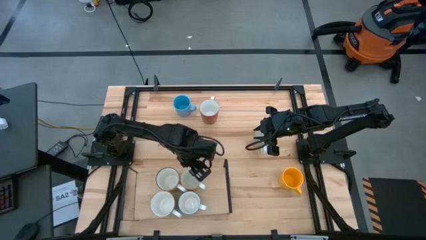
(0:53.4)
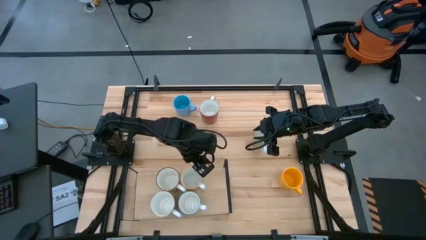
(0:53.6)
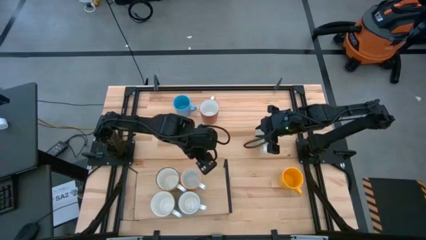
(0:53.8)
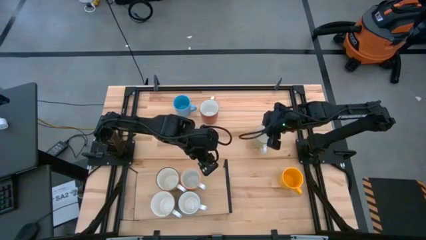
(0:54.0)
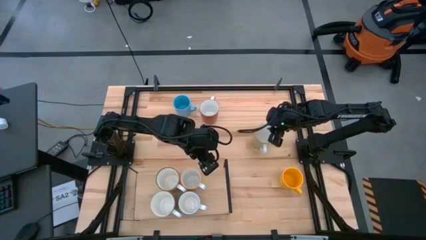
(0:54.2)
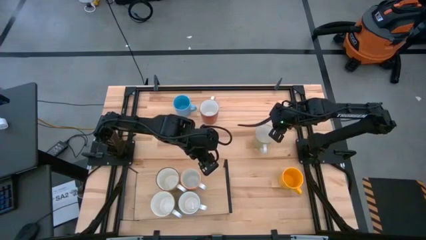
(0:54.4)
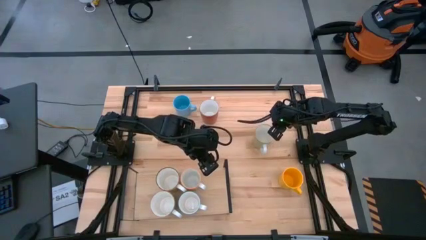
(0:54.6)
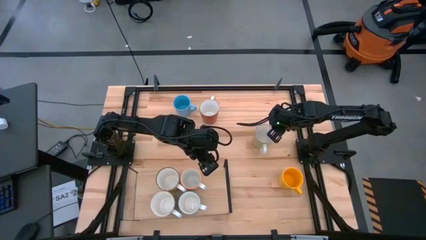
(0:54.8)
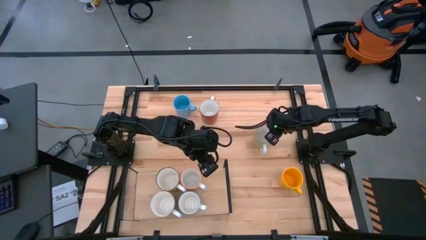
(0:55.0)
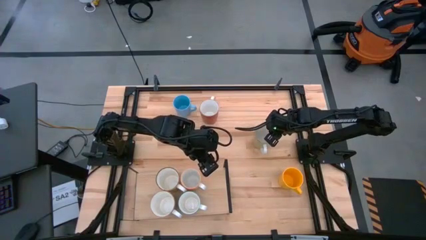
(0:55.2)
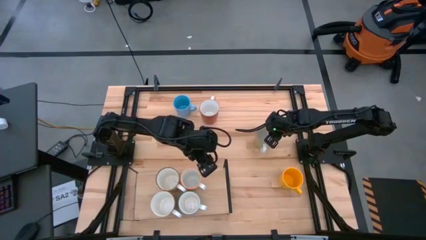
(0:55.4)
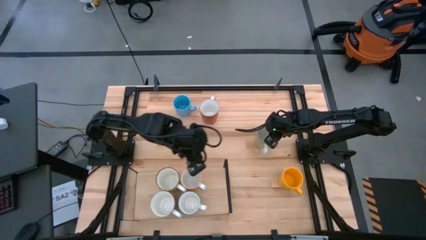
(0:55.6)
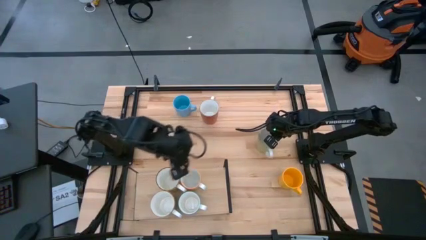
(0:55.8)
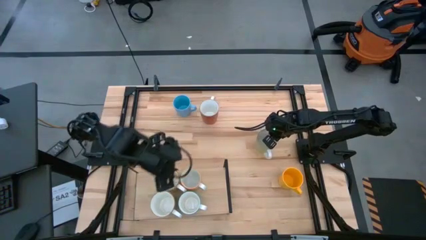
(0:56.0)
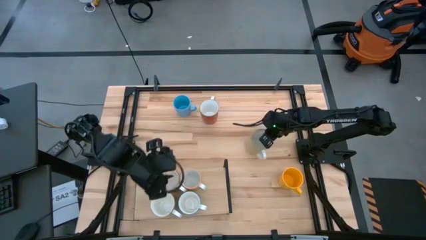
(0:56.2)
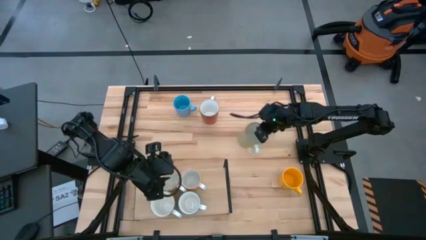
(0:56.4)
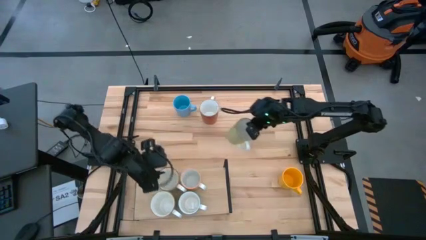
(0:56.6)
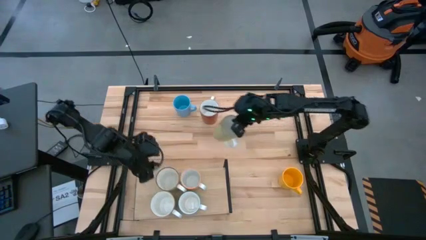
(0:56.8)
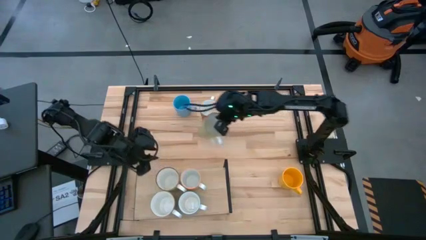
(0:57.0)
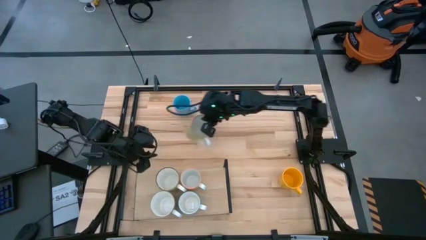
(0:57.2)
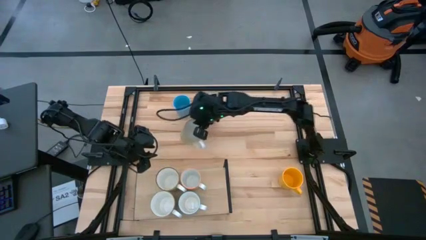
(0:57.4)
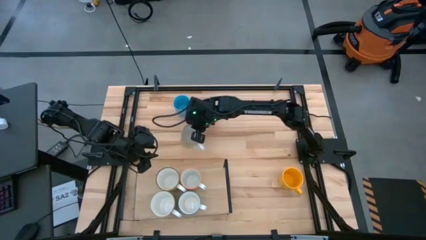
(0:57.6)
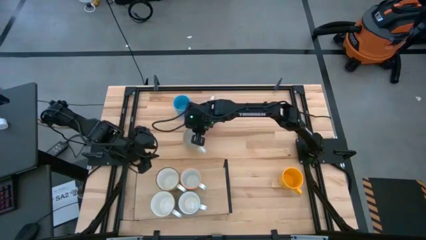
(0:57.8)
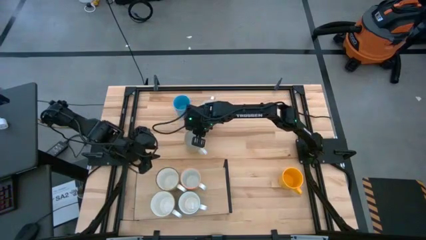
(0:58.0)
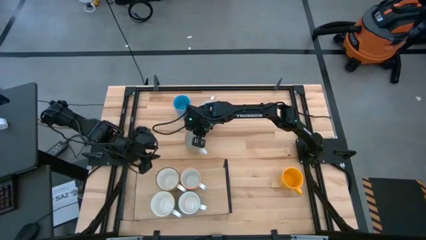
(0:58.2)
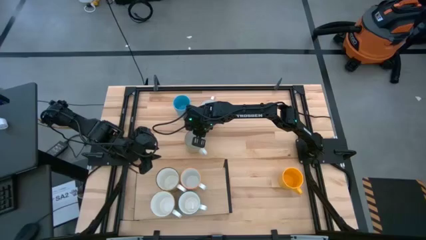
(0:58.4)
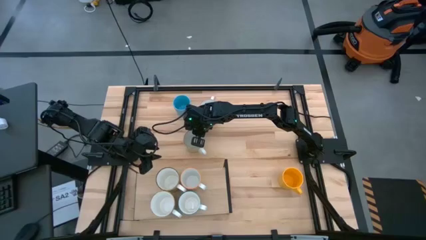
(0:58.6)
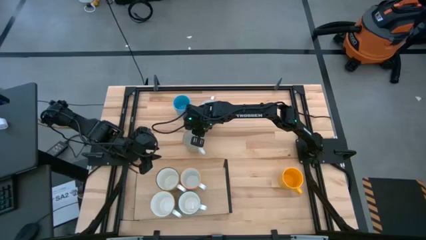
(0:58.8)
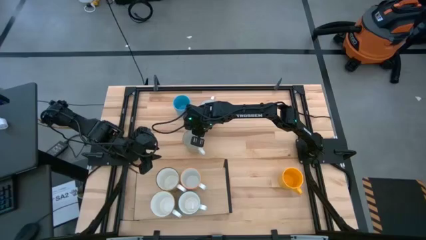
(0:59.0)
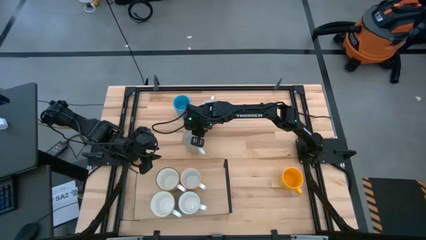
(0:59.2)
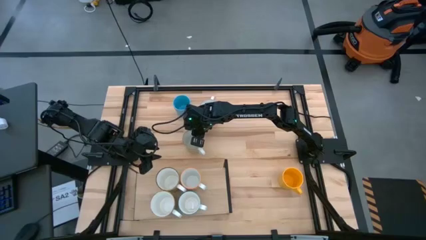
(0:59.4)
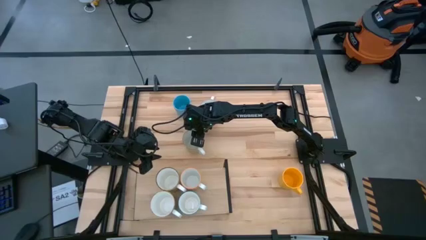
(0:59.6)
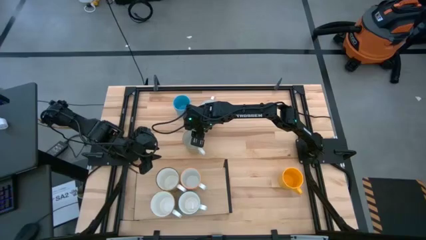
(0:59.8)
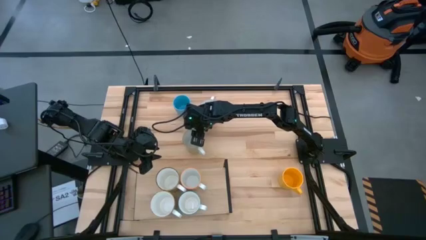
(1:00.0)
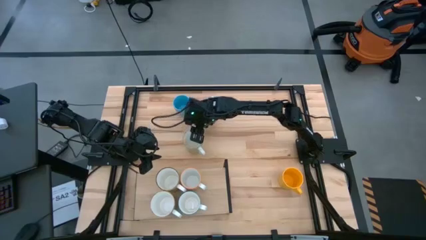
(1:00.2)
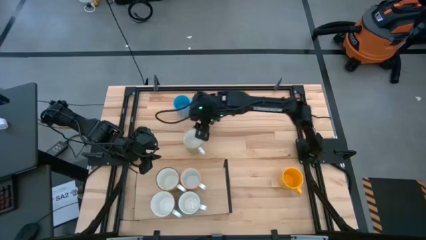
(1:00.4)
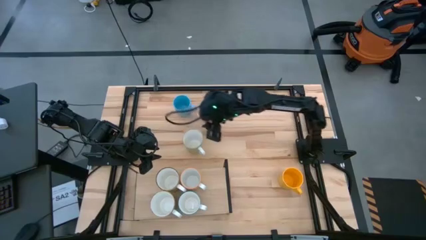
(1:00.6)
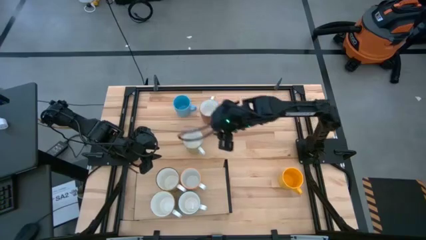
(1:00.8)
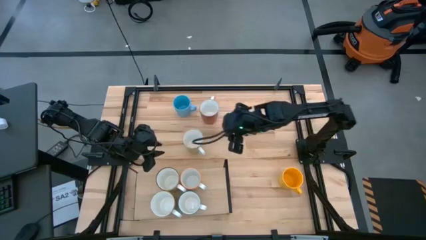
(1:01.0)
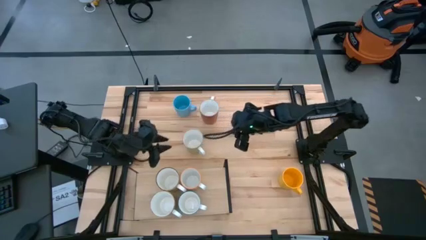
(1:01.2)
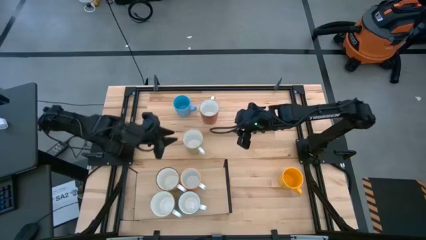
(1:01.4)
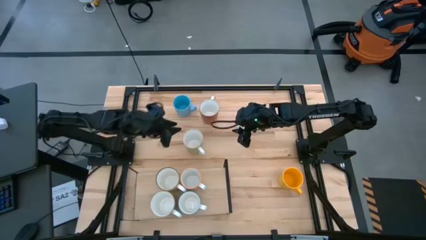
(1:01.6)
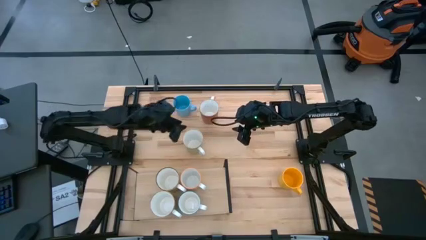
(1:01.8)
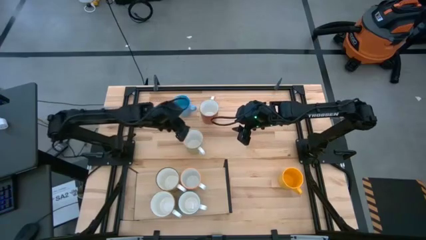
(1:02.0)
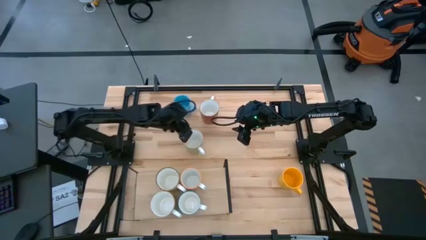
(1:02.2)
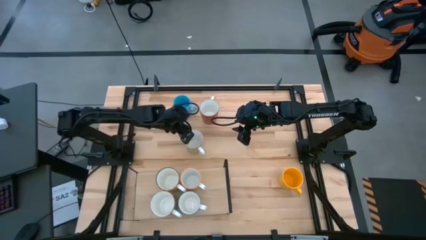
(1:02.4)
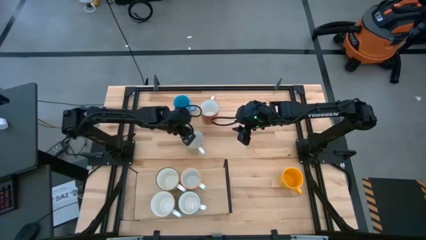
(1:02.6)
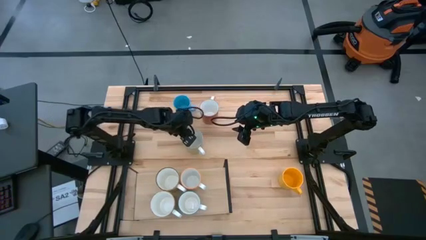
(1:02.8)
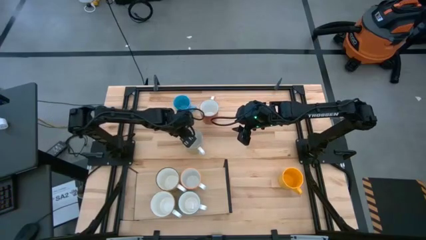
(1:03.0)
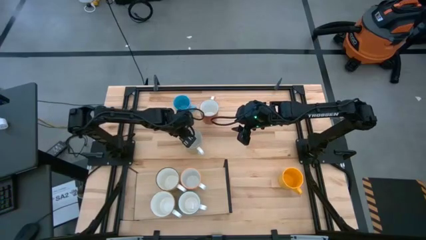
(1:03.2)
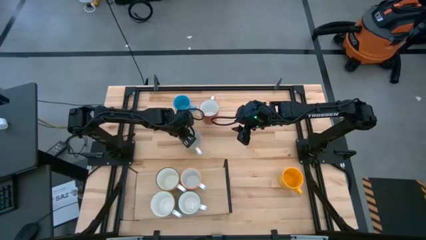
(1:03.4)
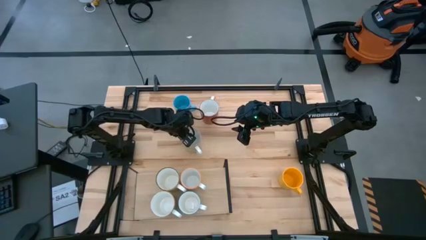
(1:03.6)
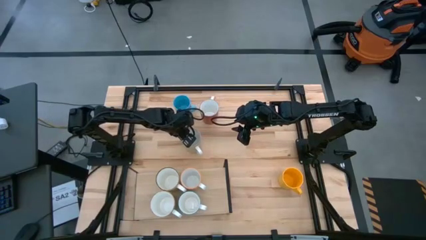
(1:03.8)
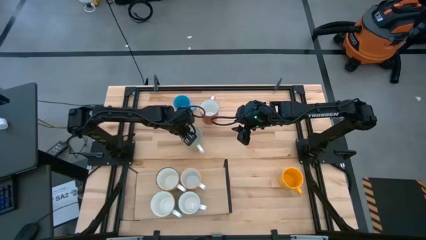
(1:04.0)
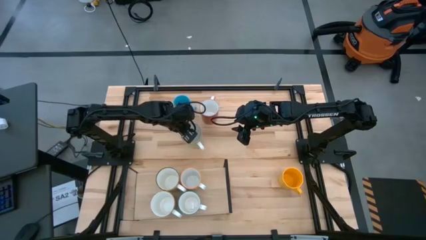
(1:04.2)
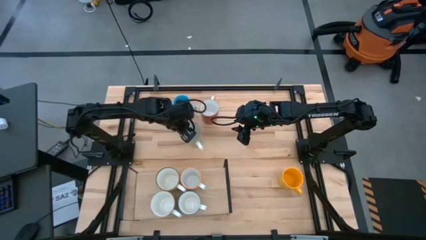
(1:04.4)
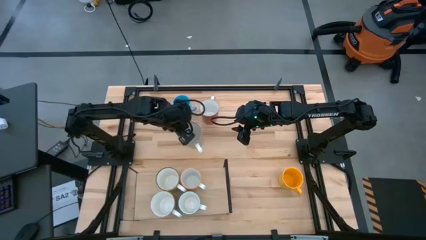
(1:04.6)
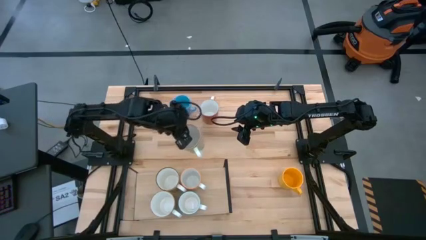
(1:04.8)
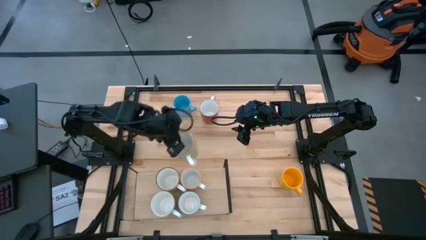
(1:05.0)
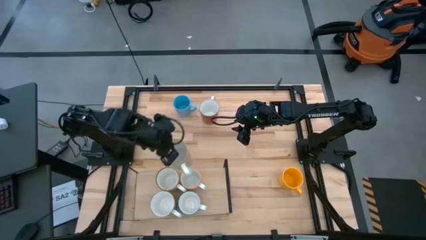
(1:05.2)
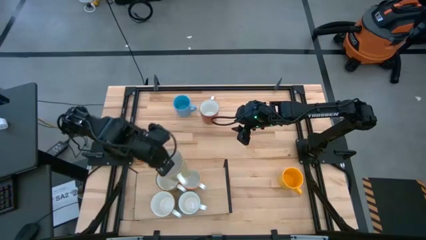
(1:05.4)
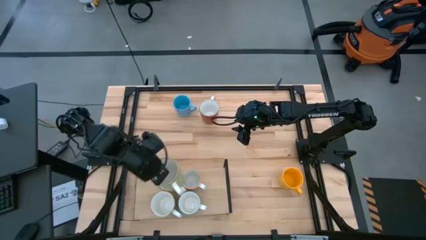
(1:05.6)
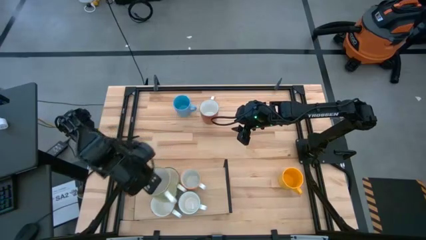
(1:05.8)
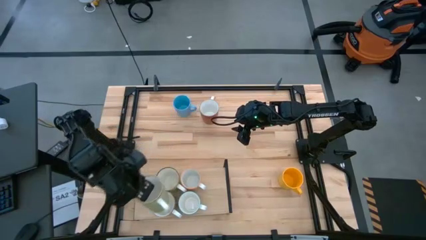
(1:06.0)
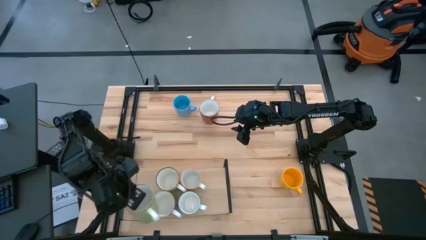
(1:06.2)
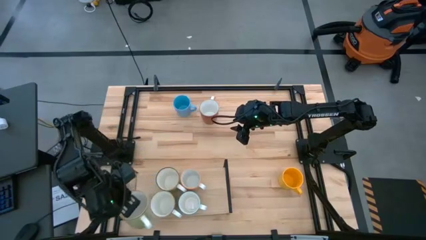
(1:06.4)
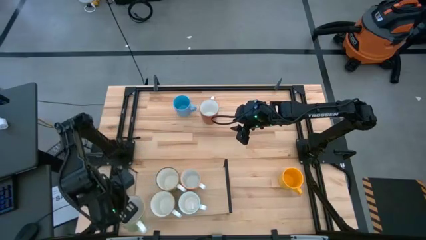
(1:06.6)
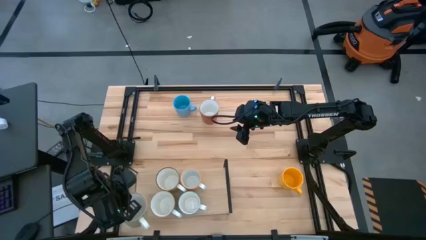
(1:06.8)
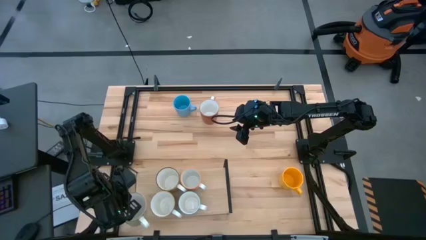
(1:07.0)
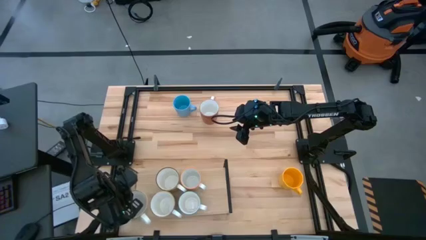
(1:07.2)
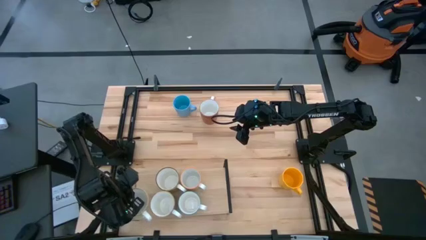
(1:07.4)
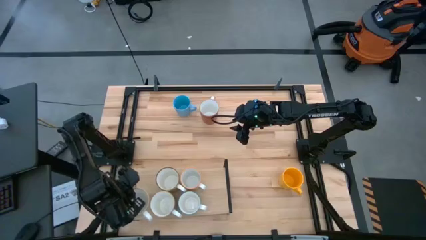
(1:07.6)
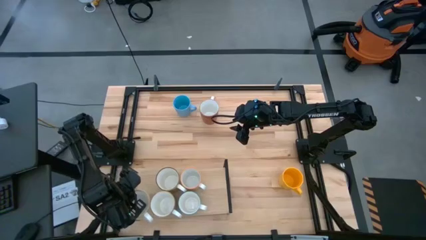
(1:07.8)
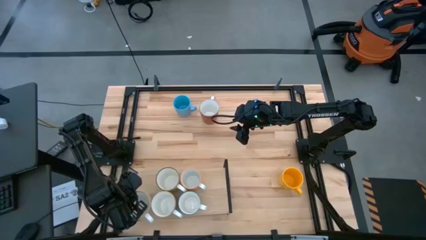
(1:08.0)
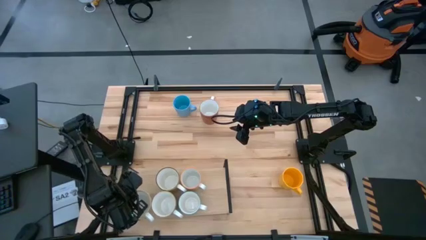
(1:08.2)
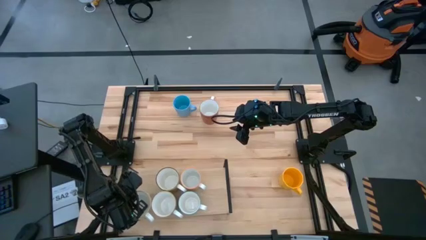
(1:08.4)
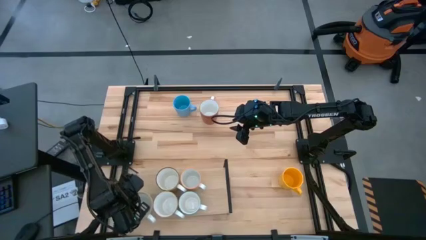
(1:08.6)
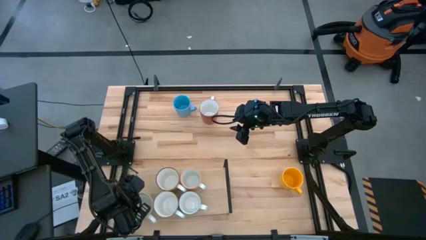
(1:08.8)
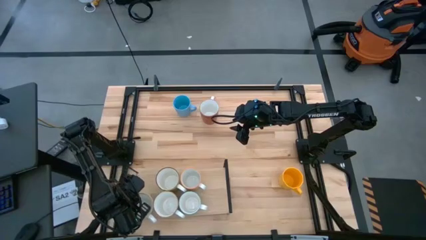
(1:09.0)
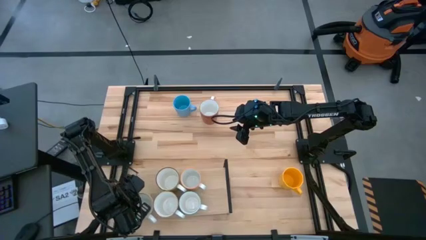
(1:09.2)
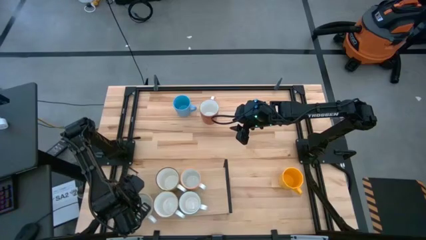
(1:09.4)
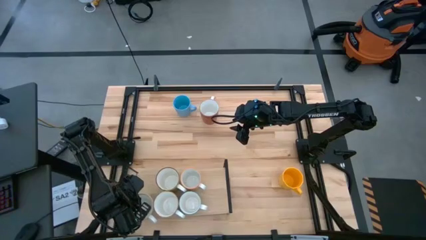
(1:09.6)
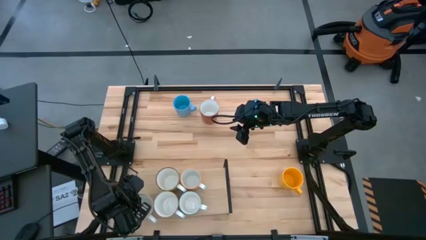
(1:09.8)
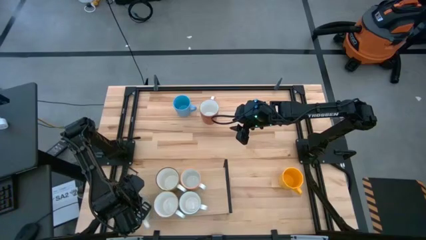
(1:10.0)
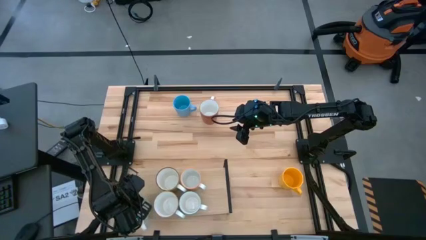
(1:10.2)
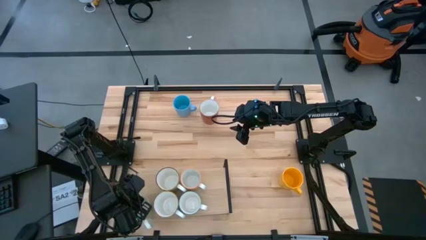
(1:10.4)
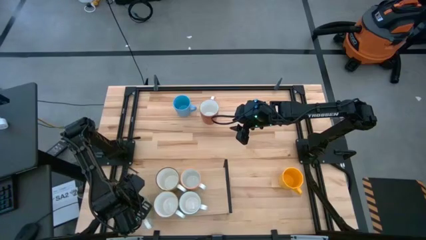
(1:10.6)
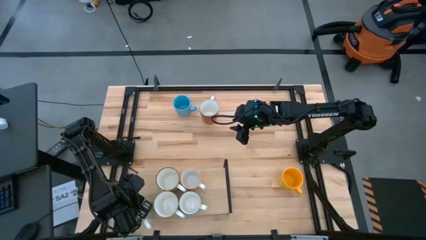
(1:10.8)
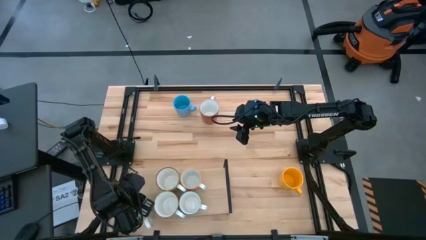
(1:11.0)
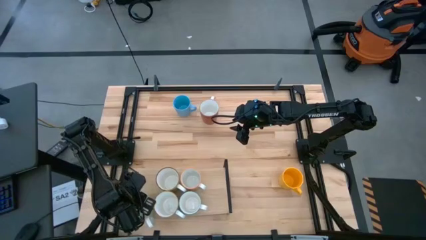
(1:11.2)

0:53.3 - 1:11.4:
Task: Place coffee mugs
Put the light green mug on the shelf
